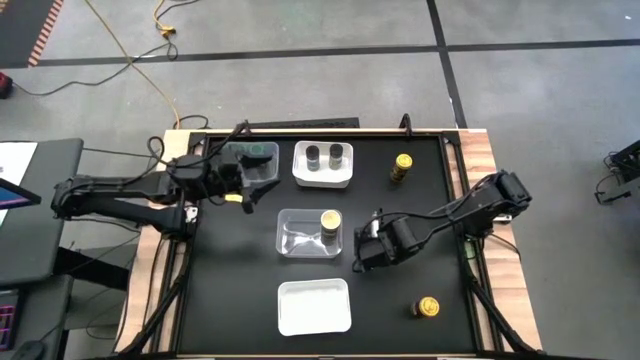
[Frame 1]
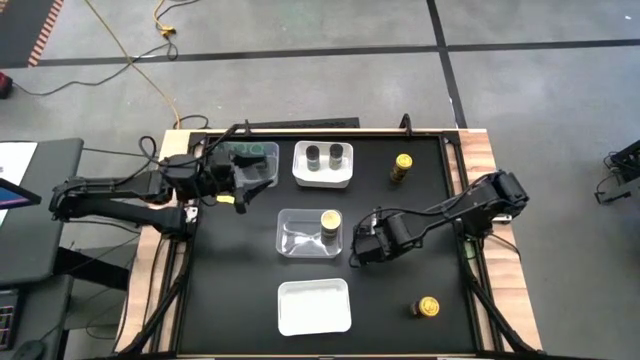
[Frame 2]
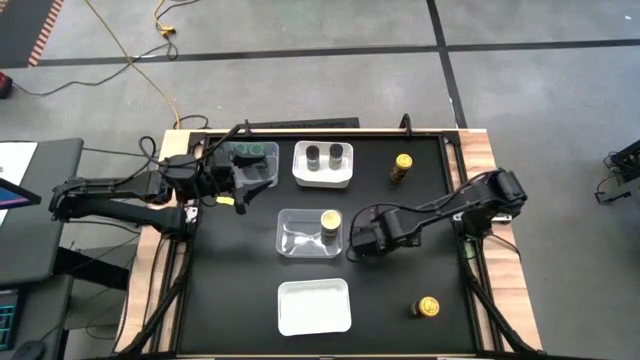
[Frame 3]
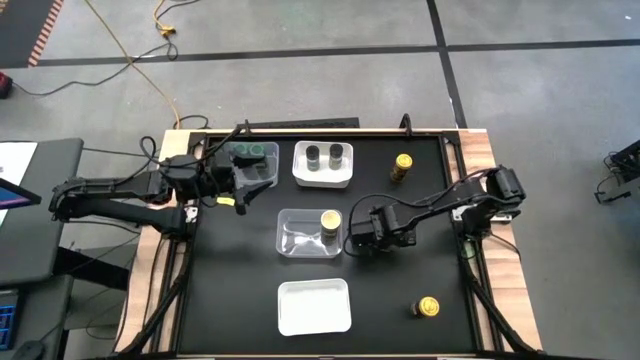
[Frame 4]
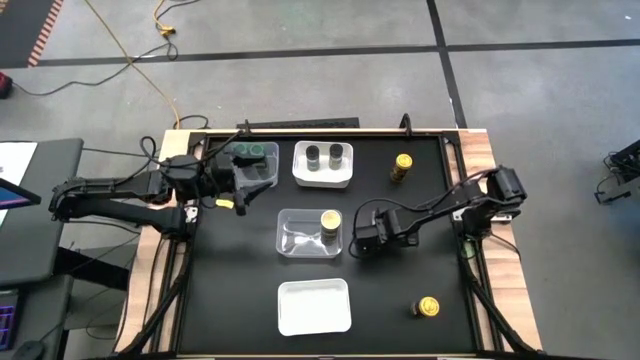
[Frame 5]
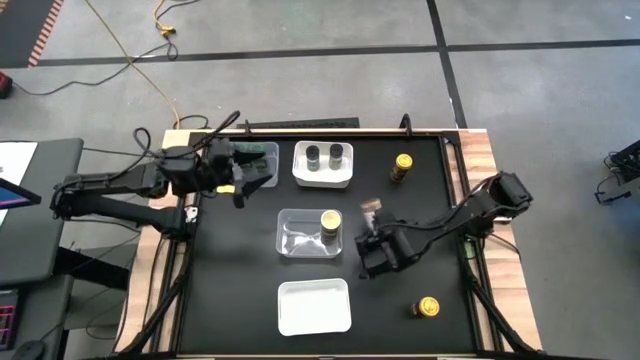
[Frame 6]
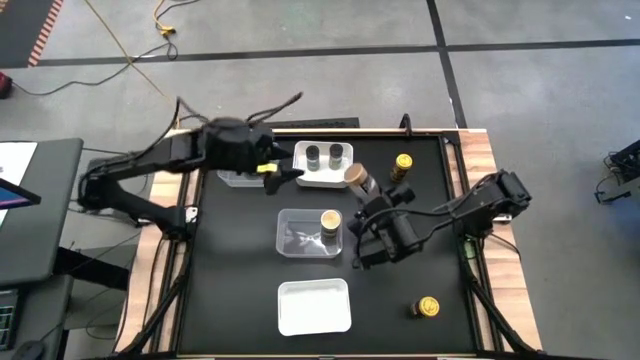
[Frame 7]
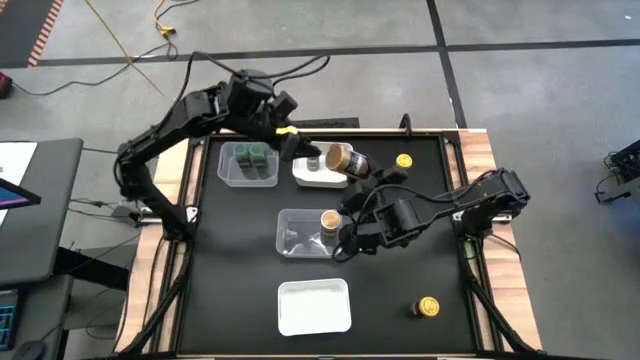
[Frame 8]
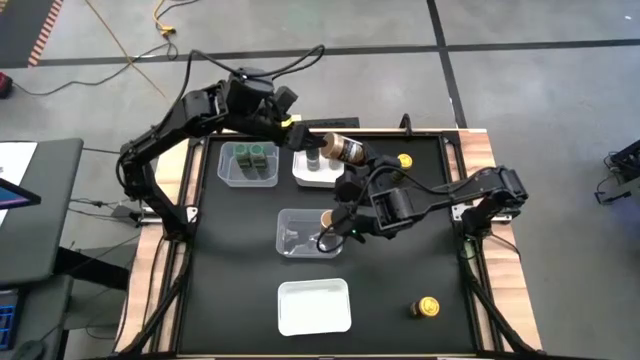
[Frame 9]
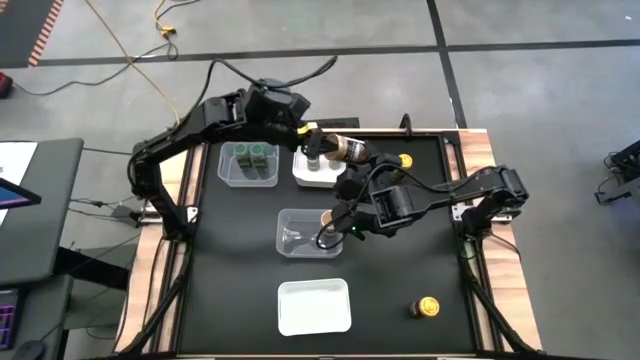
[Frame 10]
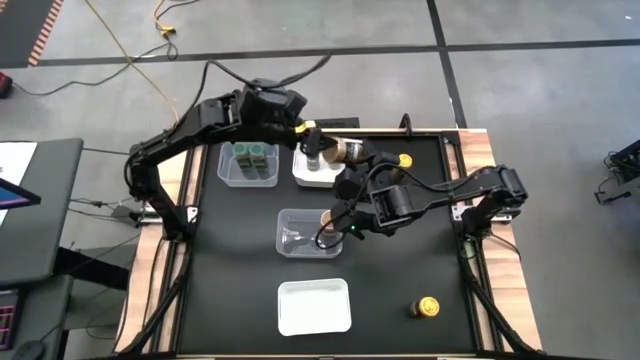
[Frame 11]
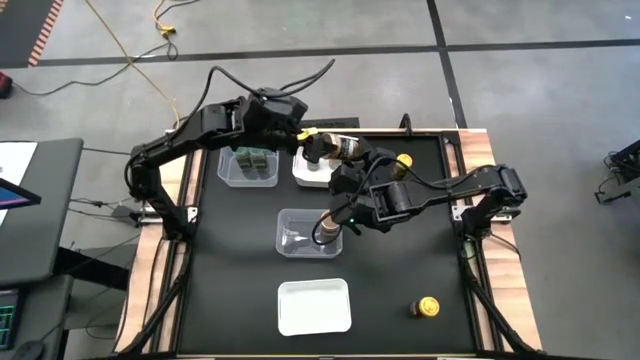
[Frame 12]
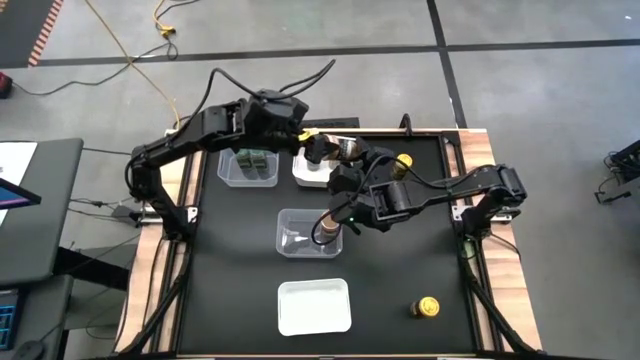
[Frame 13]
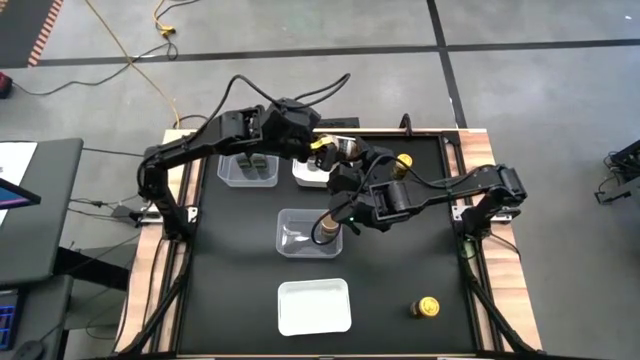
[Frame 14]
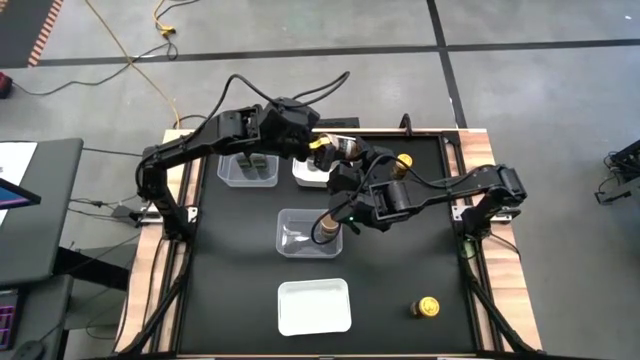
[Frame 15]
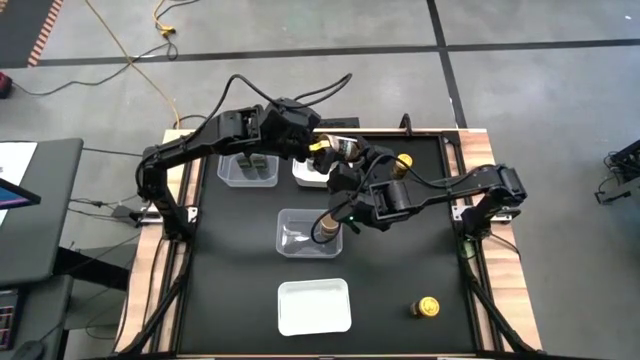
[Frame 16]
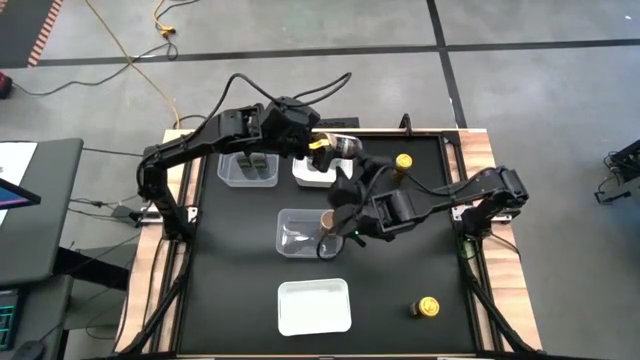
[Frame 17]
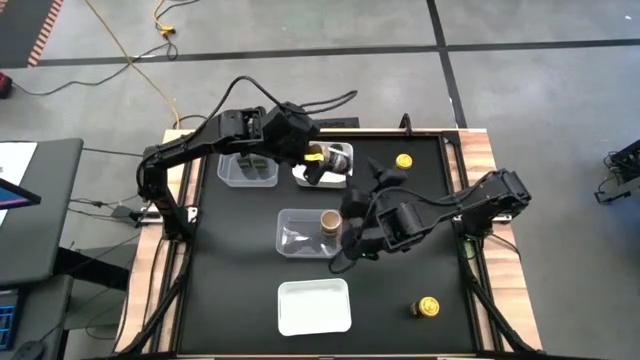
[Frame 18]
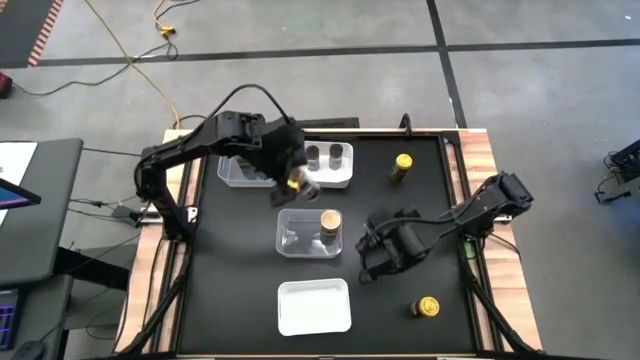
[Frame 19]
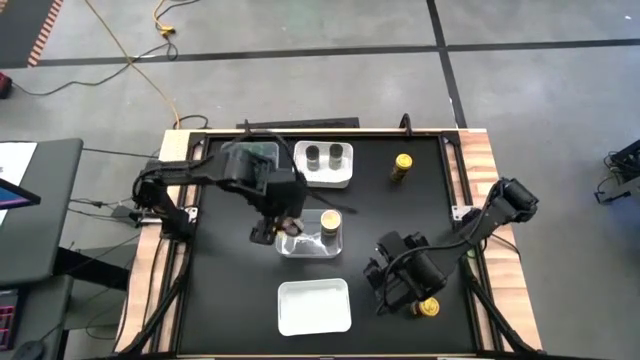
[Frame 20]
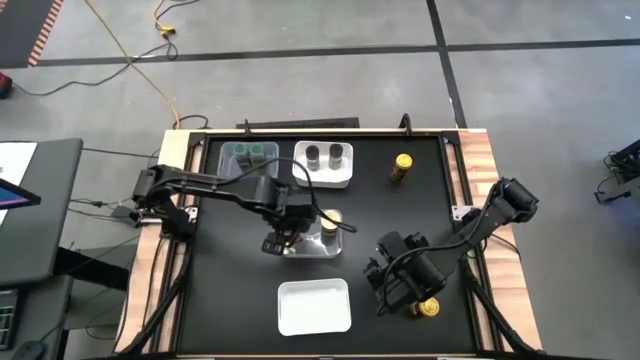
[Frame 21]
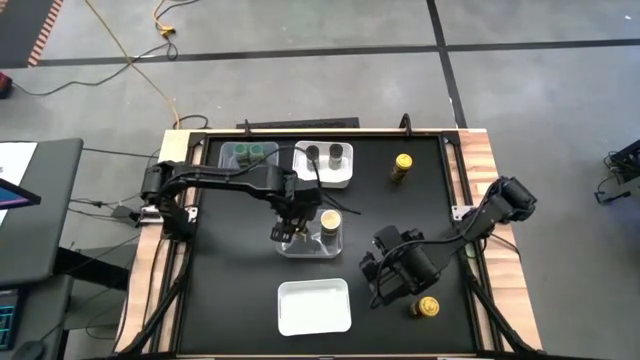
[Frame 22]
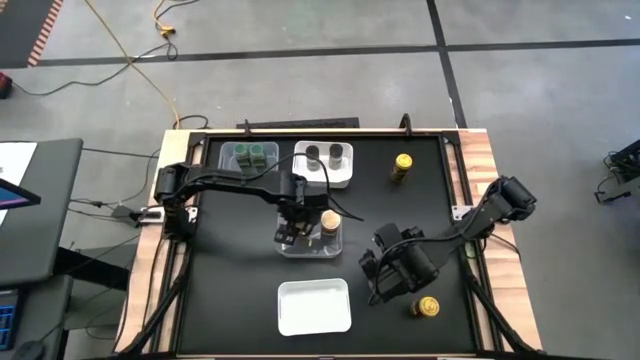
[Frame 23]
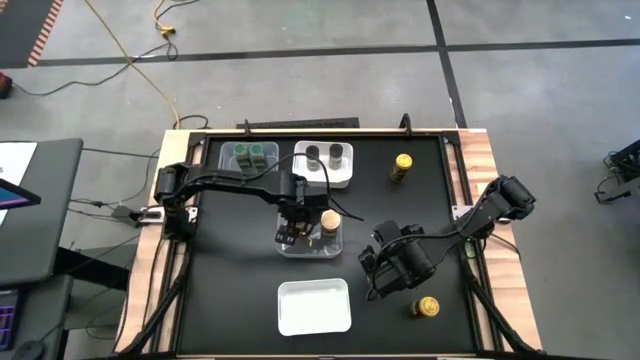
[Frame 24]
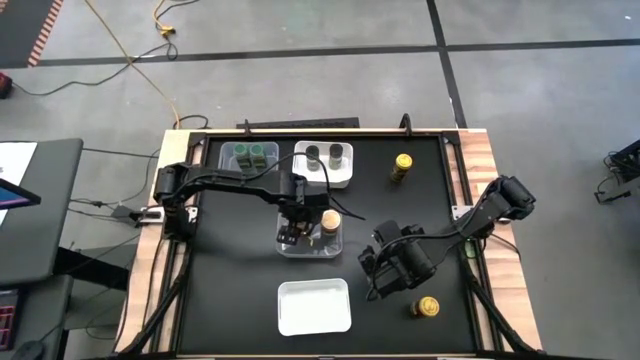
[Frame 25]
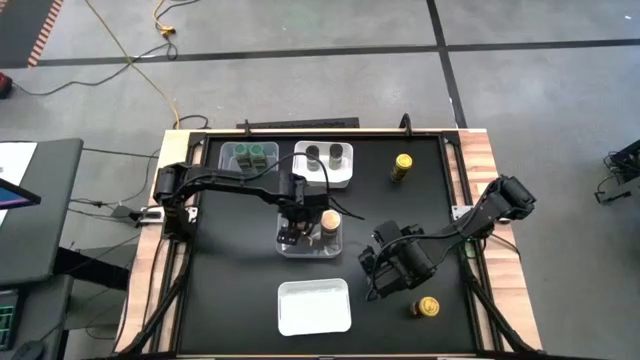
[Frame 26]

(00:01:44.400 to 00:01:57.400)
Task: Sort spices by type
Put the brown seasoning bottle into the center transparent bin

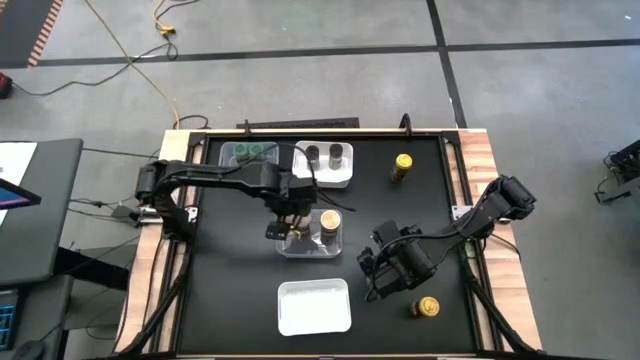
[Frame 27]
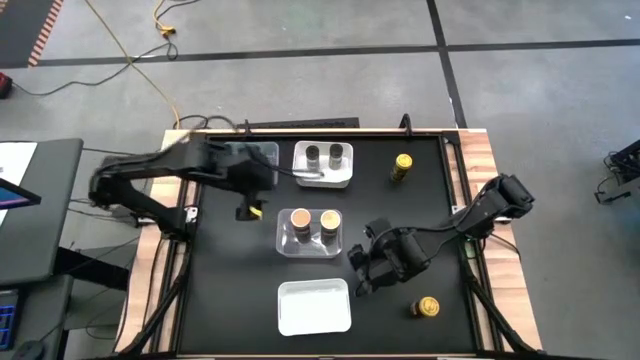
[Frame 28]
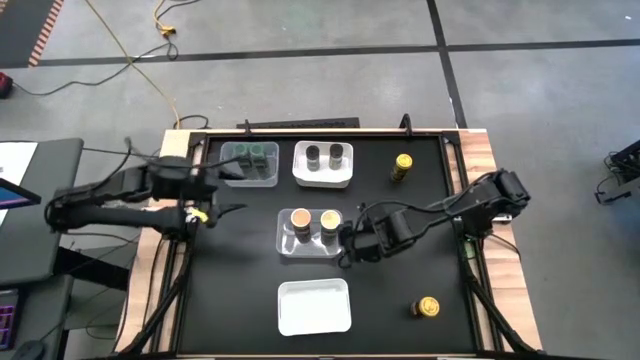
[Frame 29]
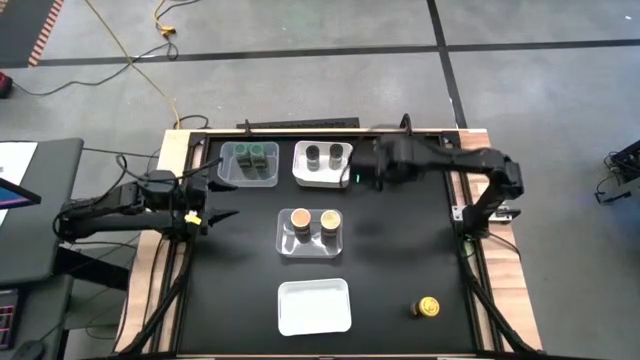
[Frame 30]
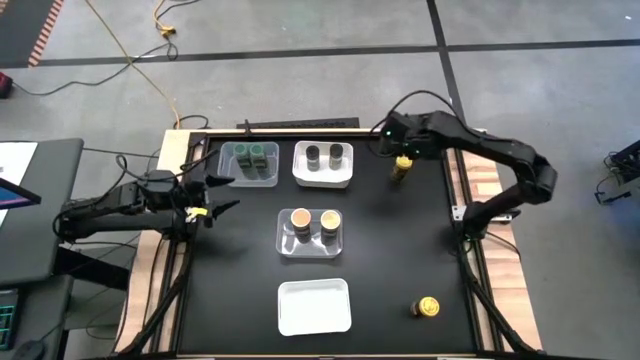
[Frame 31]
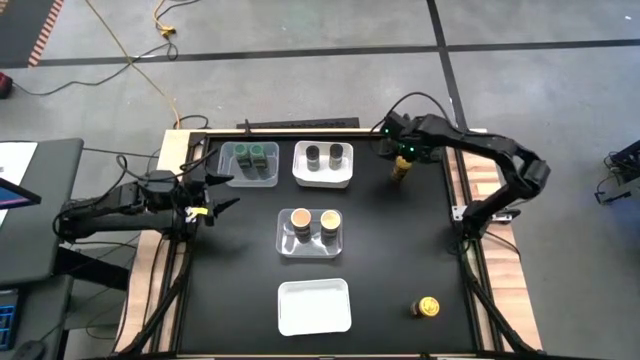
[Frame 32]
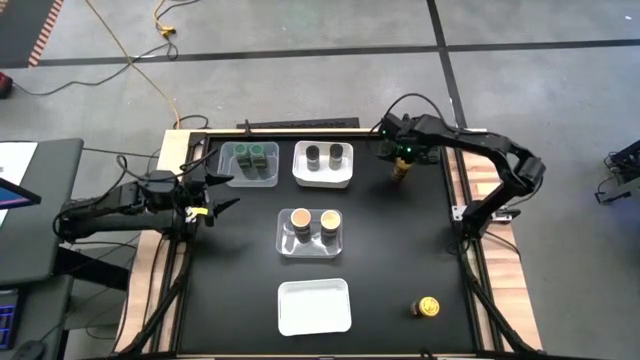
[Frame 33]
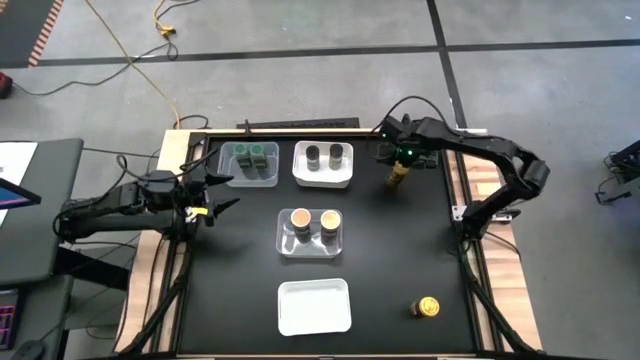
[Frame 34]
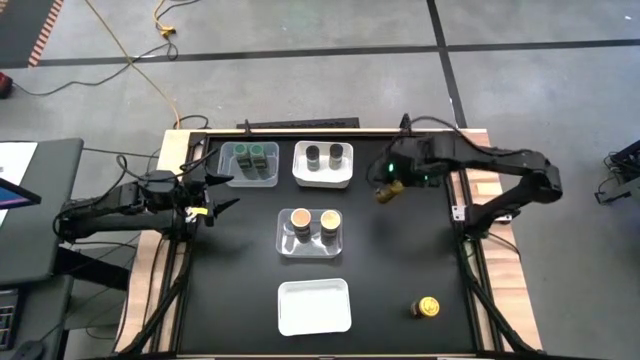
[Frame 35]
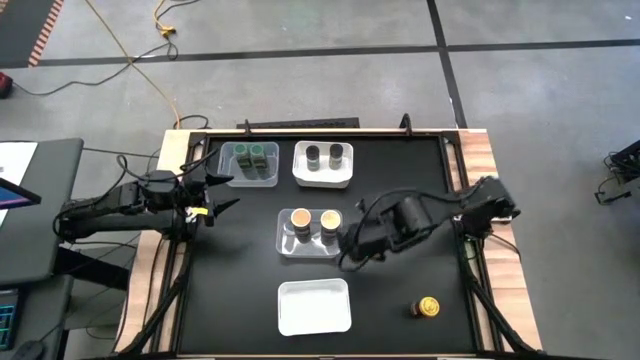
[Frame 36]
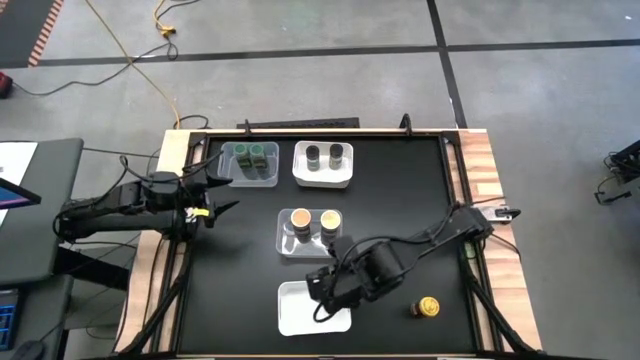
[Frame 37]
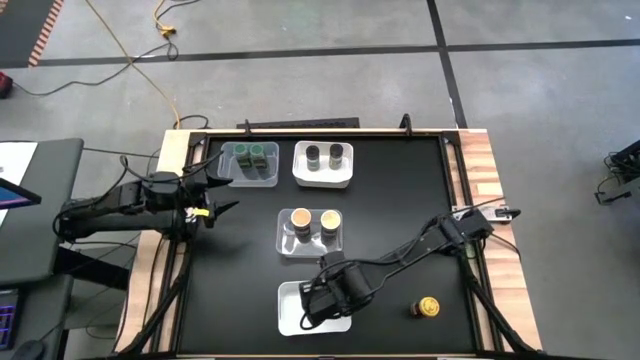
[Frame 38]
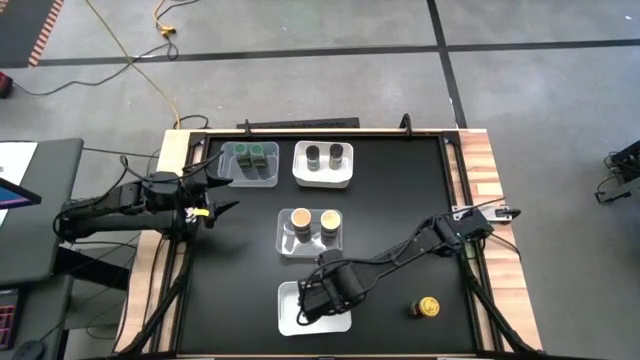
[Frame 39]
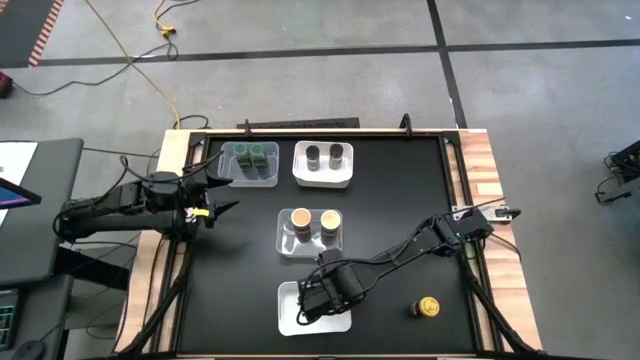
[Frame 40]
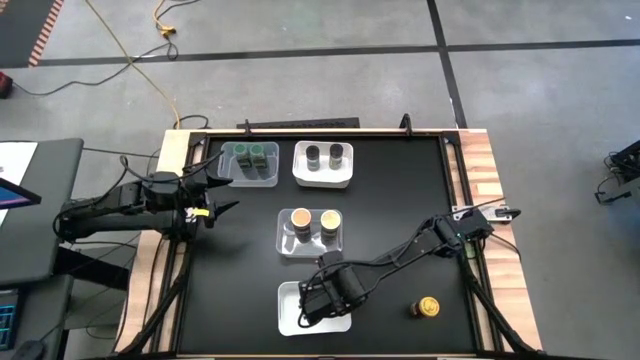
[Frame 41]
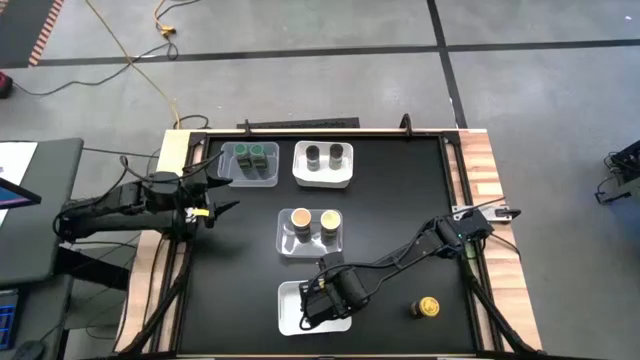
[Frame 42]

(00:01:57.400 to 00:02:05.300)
Put the top yellow seasoning bottle into the bottom white bin
